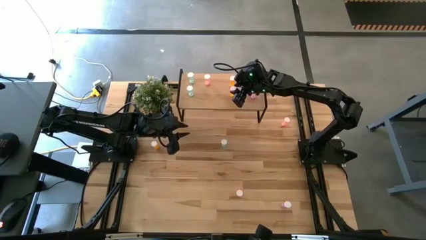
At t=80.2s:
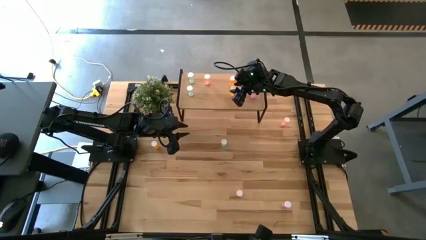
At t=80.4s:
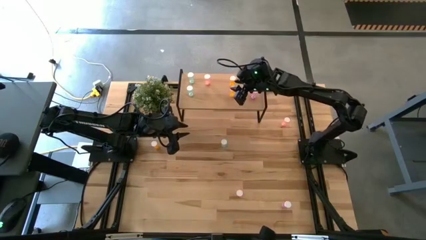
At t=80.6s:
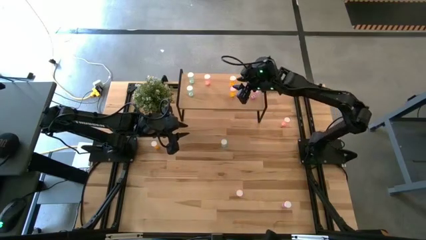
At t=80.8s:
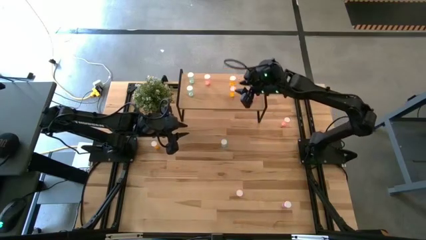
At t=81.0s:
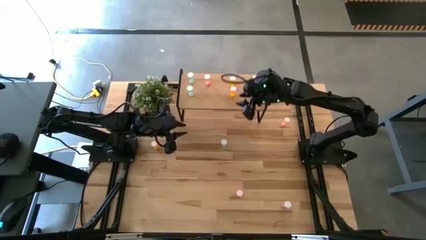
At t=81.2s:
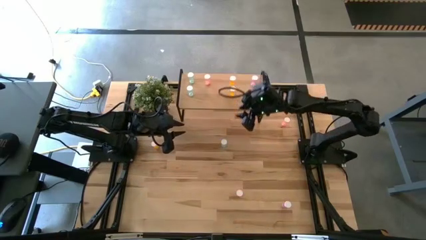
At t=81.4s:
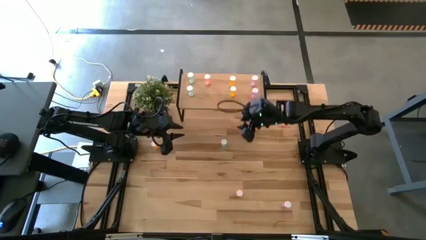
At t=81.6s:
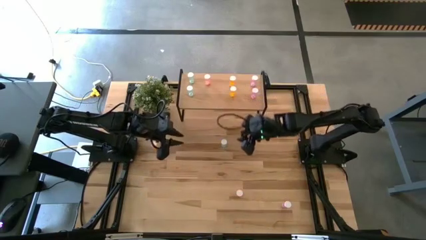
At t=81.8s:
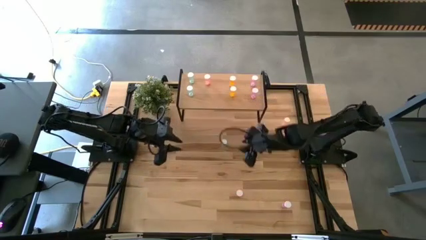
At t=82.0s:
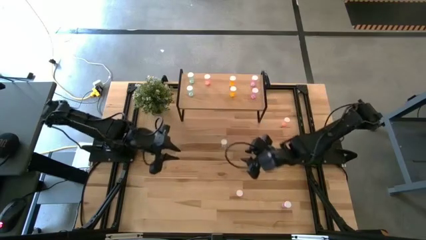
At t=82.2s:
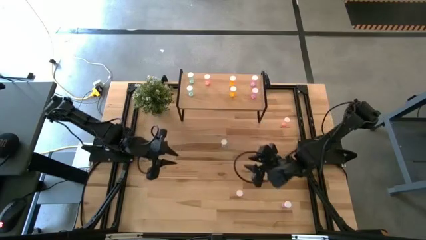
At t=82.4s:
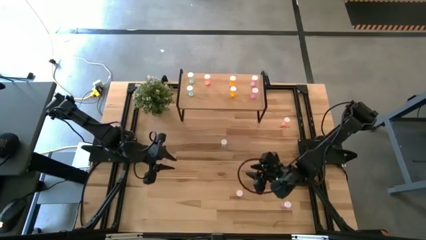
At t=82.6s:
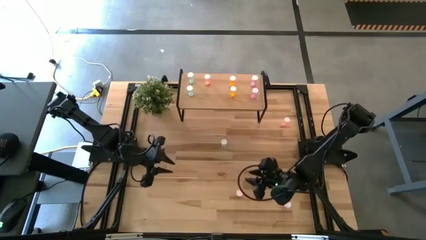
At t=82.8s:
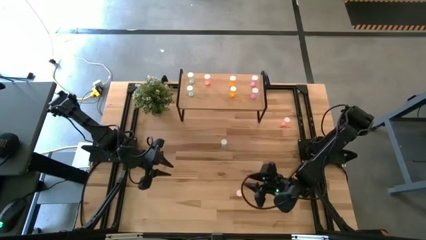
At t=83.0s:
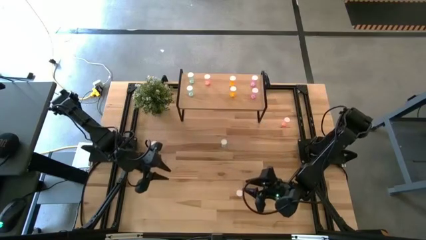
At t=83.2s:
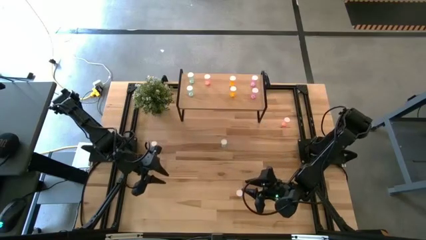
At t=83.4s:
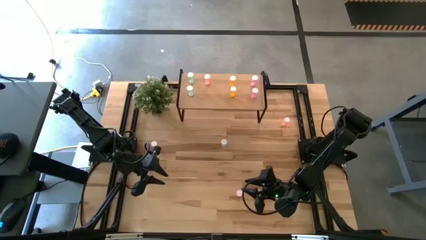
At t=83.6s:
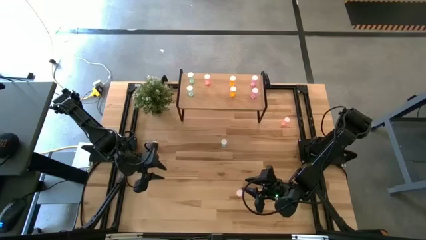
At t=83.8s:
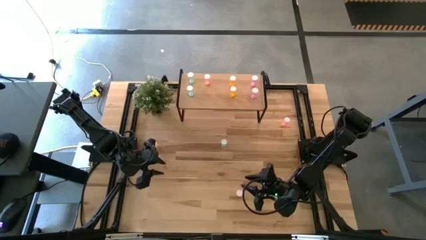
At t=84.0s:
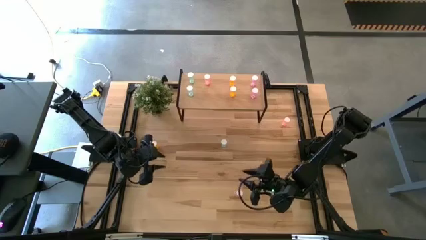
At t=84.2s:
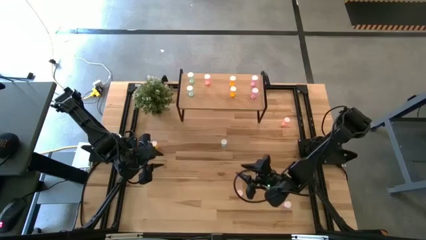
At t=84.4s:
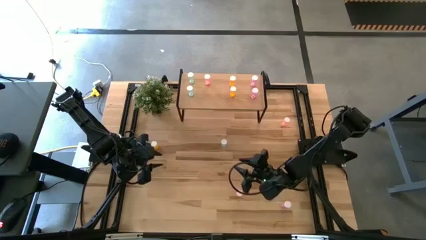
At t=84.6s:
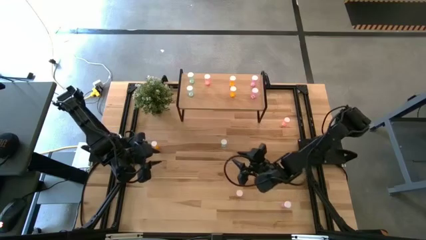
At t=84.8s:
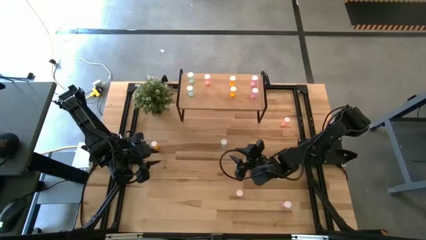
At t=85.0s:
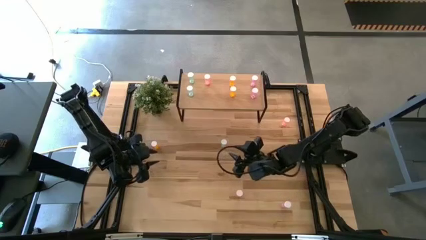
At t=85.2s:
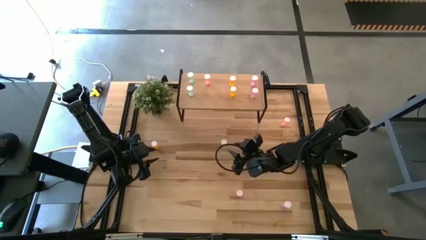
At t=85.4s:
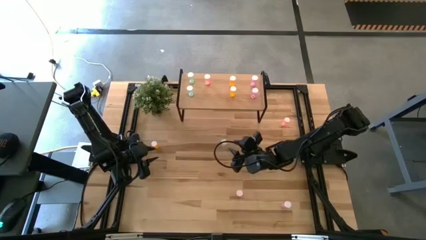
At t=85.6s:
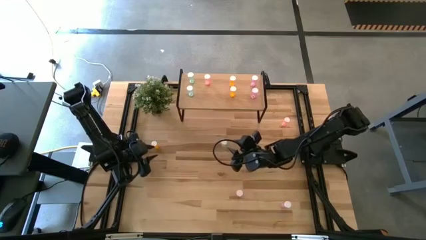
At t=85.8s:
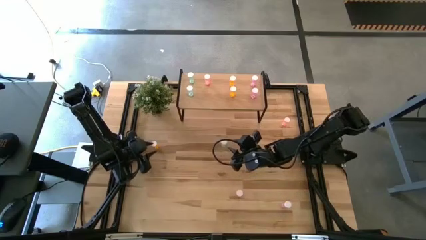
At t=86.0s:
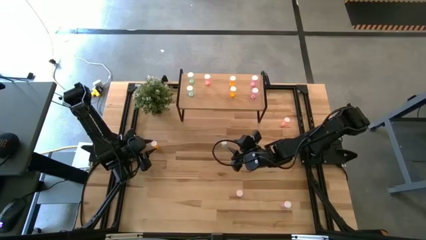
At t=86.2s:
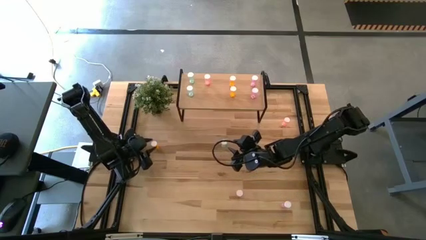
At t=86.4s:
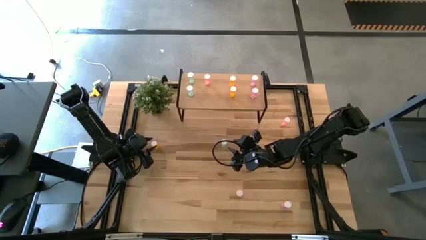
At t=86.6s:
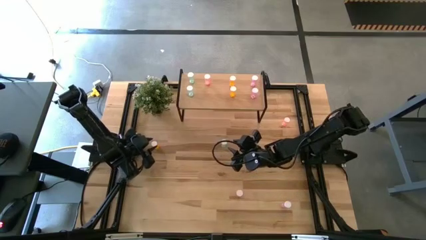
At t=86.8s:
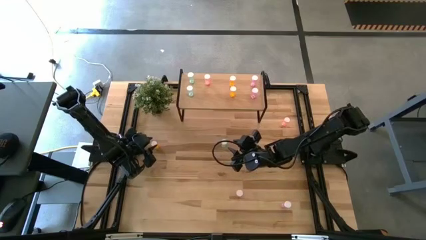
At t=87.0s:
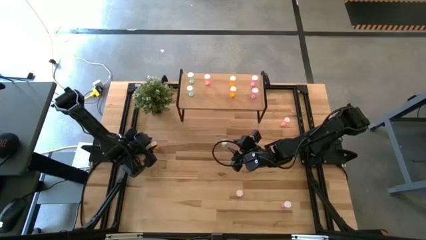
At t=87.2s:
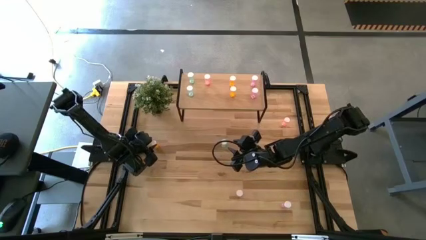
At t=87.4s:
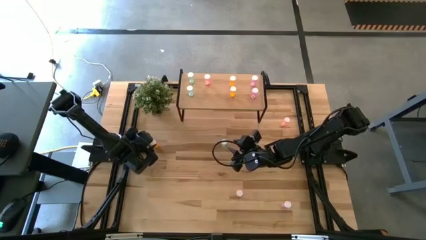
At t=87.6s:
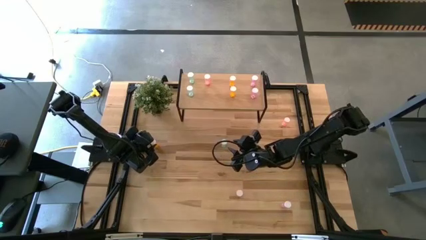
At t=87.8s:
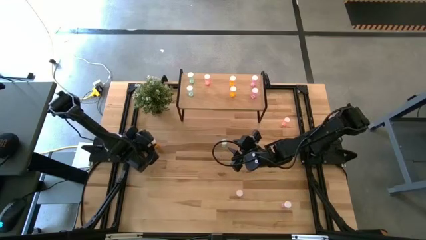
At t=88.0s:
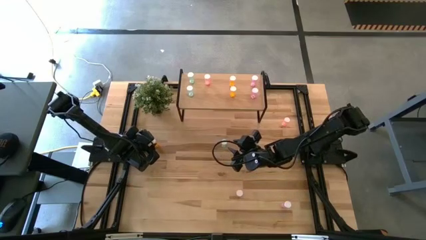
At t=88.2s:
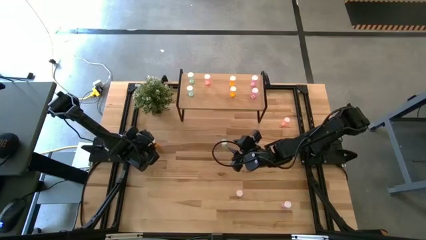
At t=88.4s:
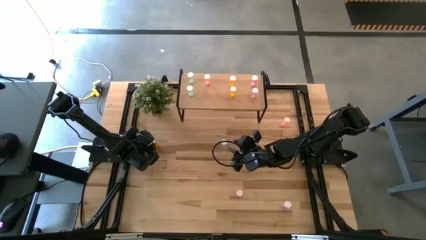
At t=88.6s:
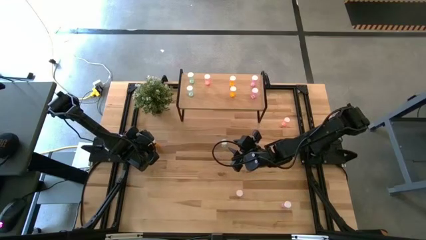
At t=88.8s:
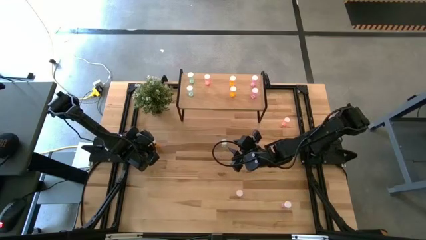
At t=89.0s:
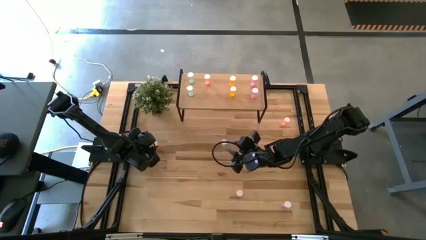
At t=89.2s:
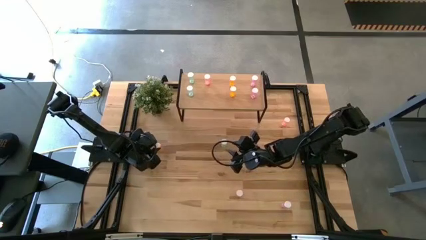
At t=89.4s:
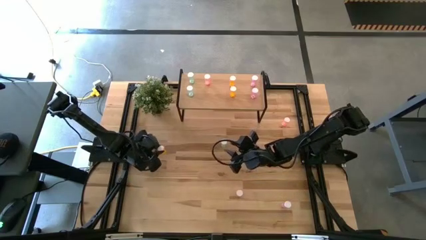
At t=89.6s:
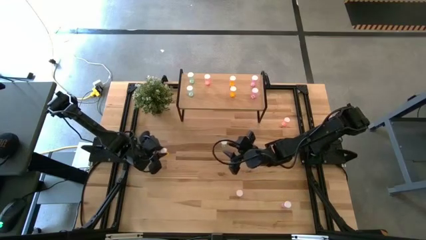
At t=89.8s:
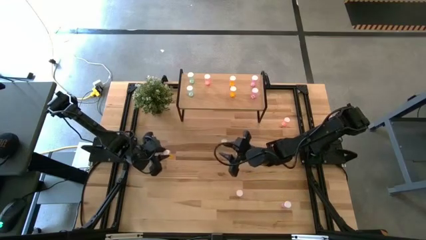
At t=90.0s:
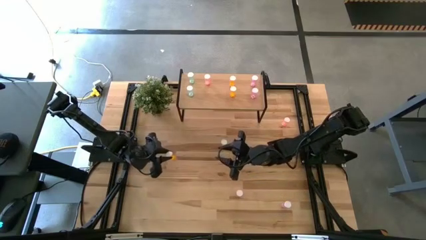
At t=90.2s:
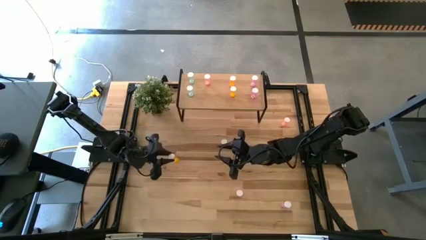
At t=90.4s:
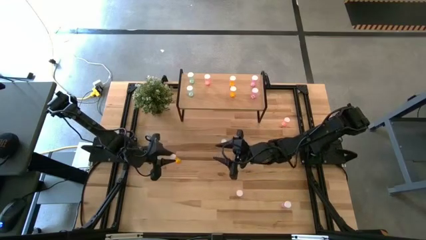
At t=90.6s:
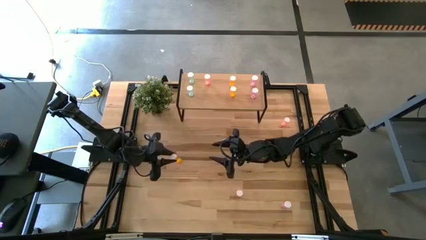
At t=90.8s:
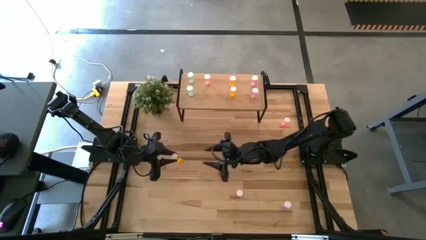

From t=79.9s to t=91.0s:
Task: Pick and place medicine bottles onto shelf by color
Put the orange pill bottle on the shelf aligned with the other orange pill bottles
